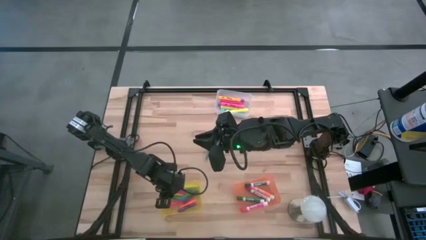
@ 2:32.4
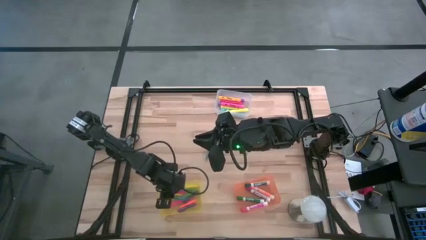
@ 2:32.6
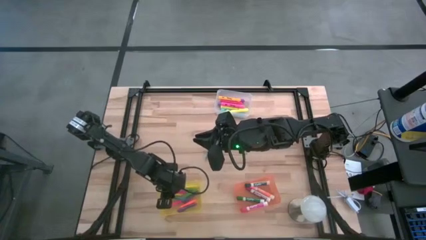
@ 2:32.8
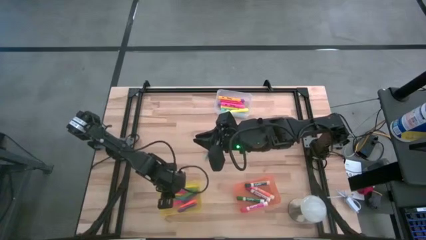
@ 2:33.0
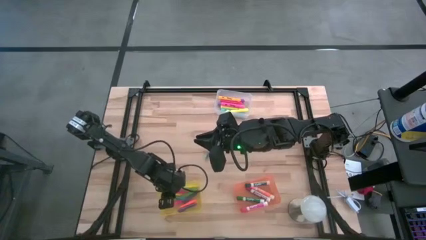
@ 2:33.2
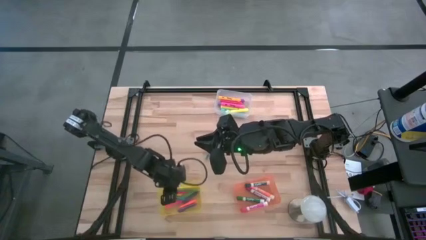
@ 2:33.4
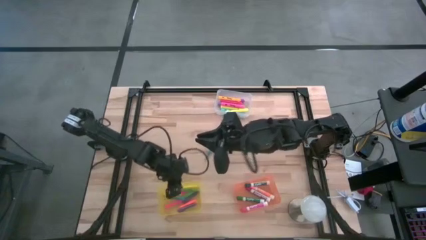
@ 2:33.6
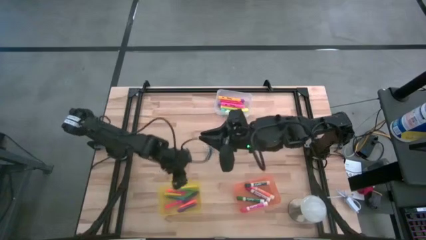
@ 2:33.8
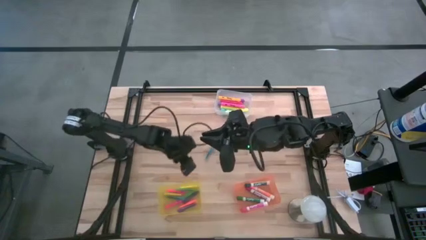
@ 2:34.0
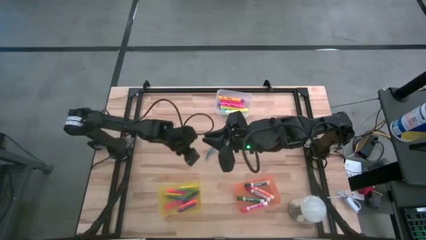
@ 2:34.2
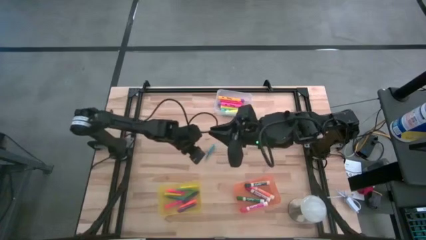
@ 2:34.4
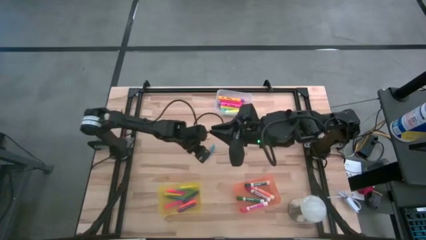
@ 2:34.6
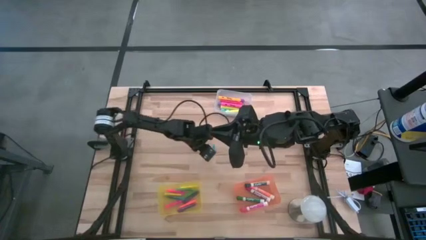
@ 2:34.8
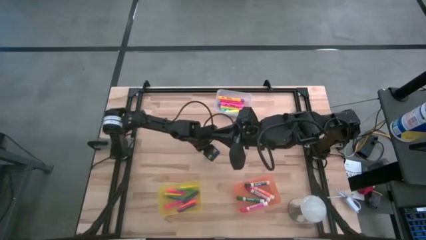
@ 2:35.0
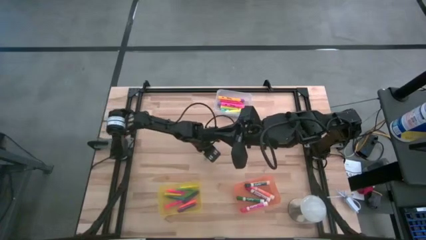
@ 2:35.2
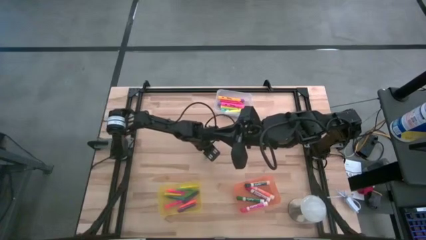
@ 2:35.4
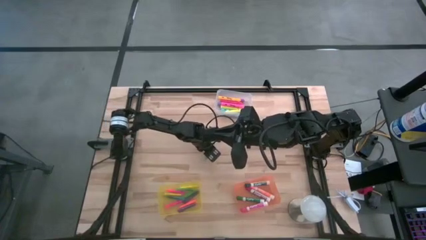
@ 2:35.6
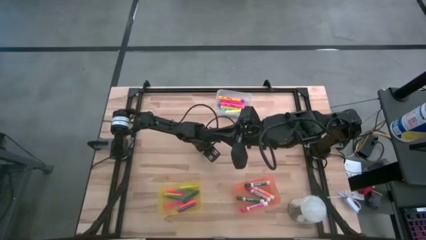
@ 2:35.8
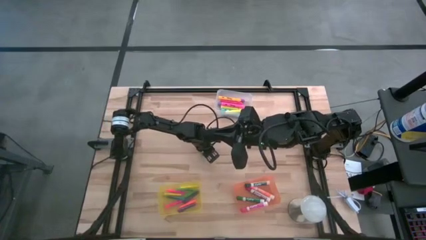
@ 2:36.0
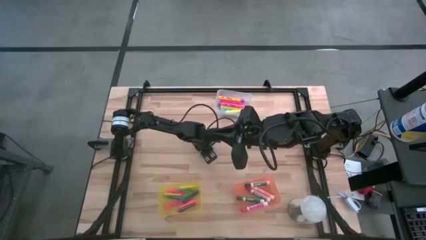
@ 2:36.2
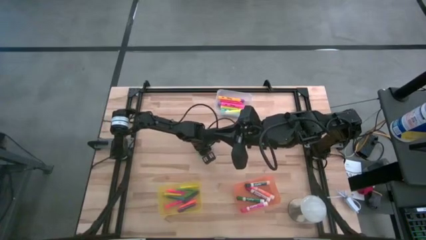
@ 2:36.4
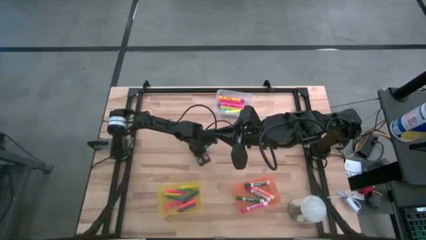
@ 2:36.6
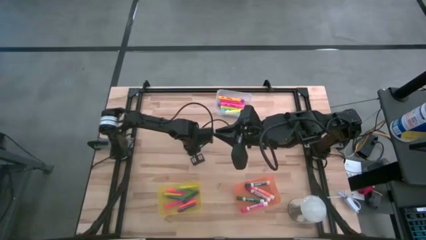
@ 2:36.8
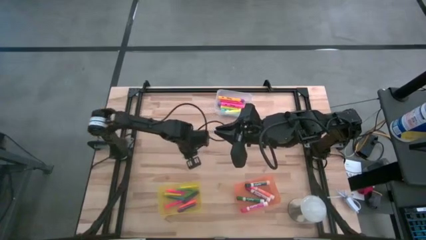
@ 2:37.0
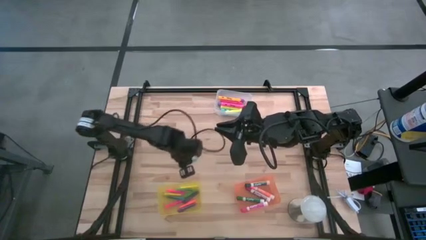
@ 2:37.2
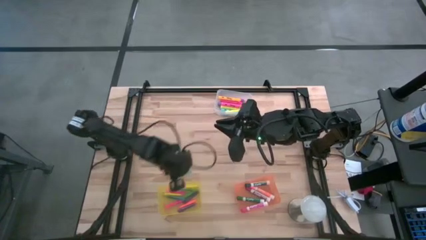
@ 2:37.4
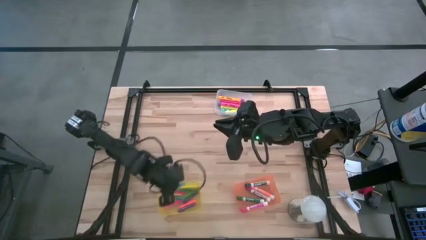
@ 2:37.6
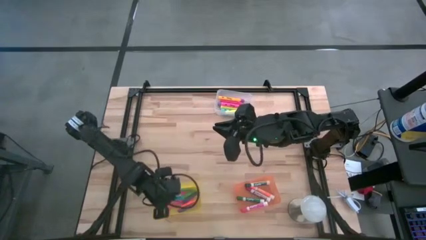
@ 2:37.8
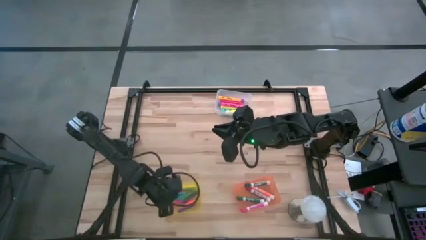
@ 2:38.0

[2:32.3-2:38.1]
Task: Pick & Place Markers
Put the blue pen into the yellow bin

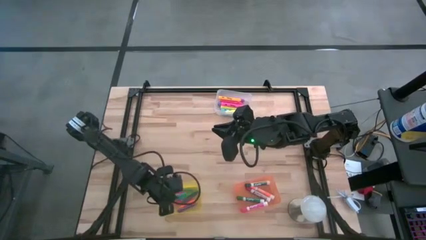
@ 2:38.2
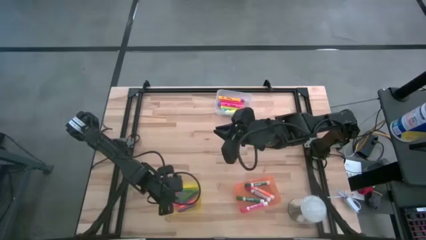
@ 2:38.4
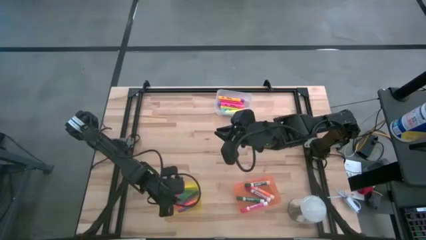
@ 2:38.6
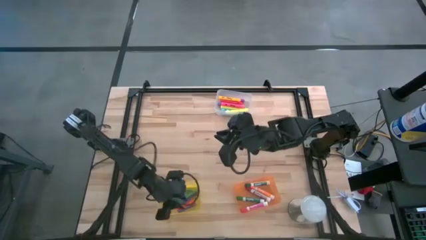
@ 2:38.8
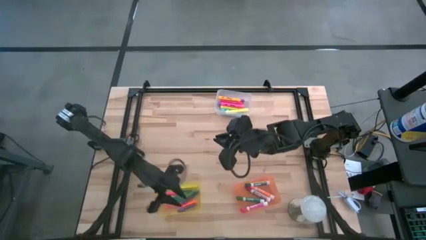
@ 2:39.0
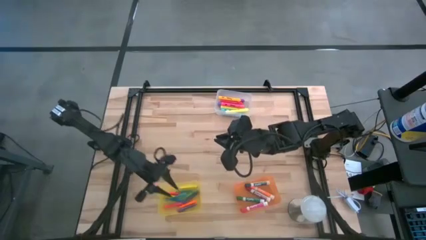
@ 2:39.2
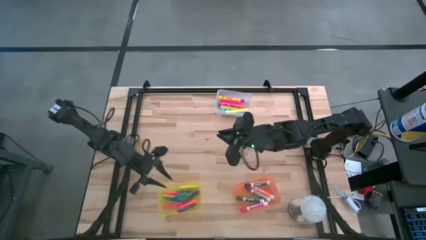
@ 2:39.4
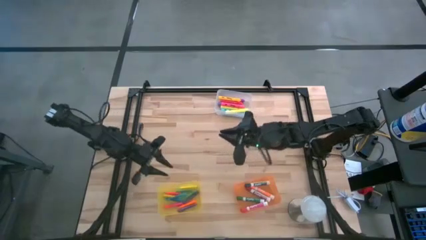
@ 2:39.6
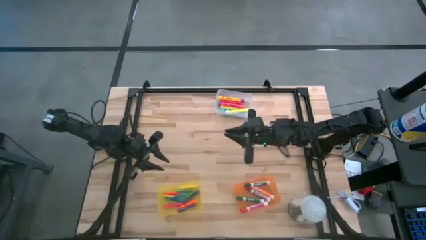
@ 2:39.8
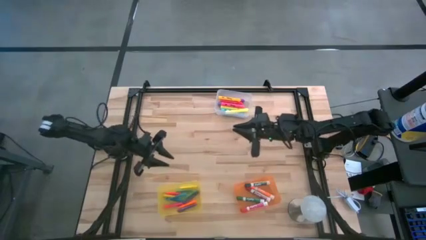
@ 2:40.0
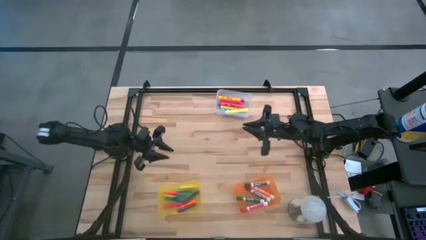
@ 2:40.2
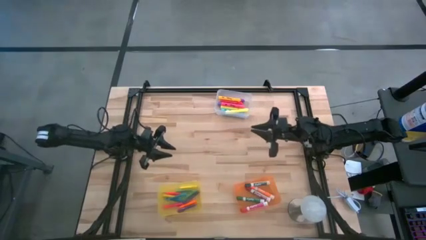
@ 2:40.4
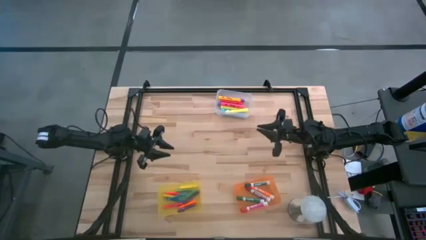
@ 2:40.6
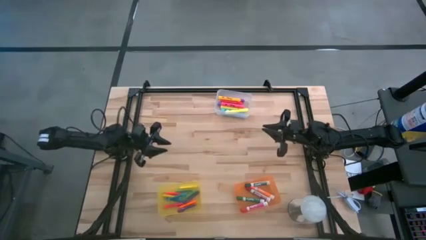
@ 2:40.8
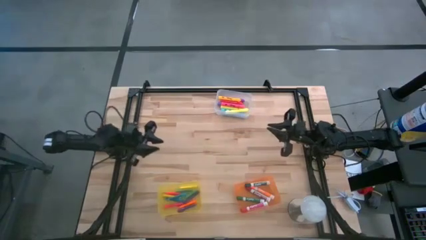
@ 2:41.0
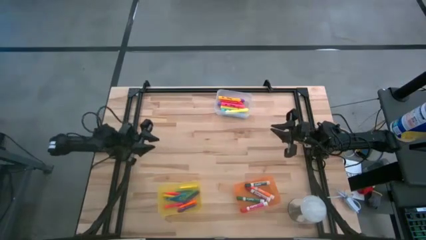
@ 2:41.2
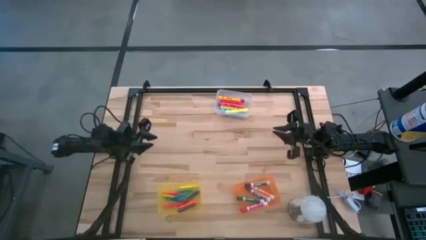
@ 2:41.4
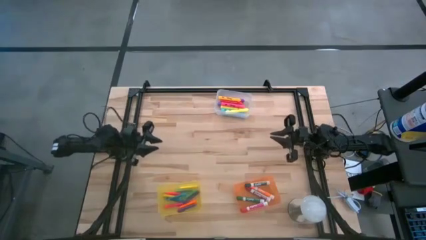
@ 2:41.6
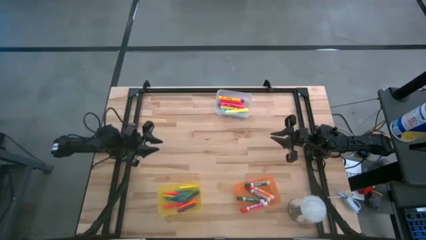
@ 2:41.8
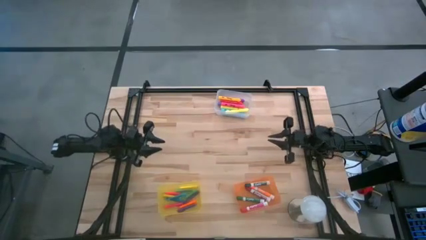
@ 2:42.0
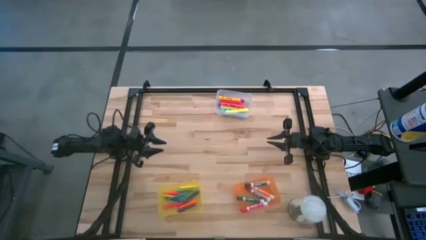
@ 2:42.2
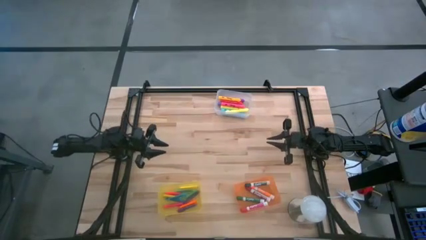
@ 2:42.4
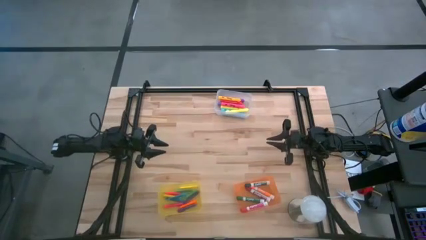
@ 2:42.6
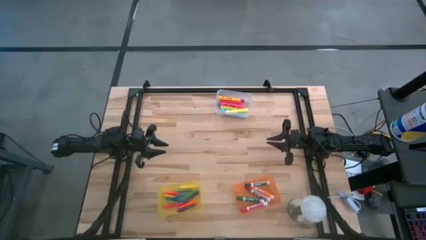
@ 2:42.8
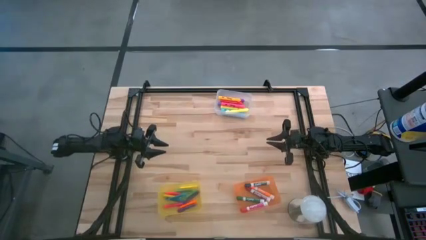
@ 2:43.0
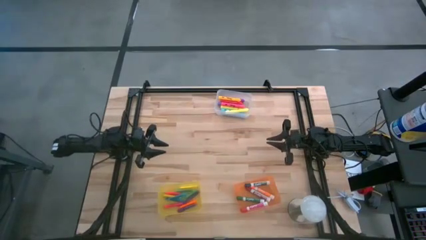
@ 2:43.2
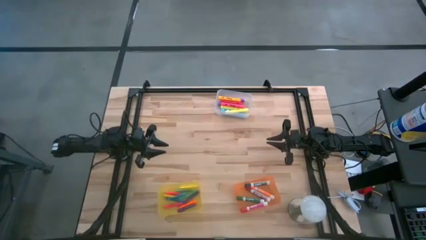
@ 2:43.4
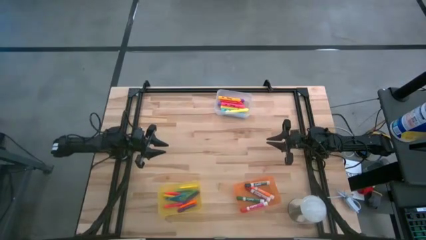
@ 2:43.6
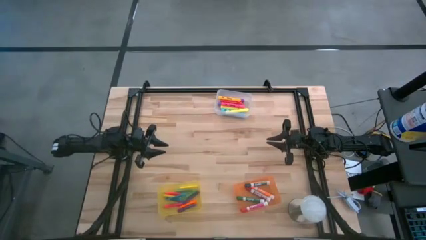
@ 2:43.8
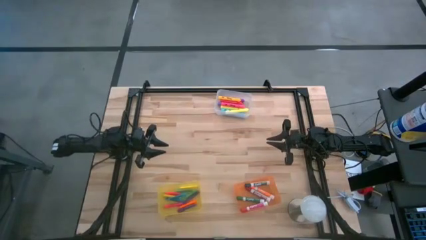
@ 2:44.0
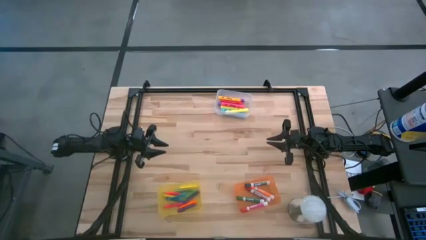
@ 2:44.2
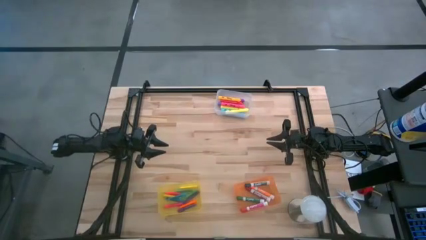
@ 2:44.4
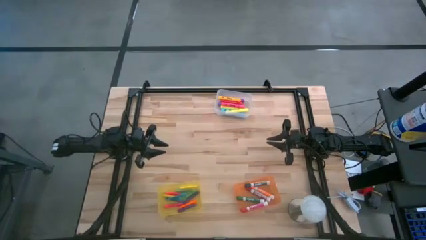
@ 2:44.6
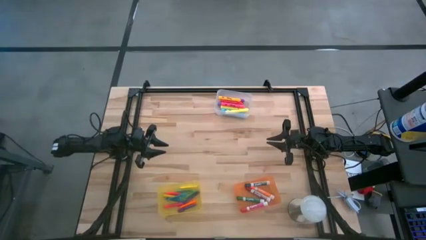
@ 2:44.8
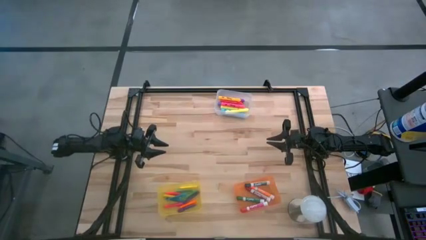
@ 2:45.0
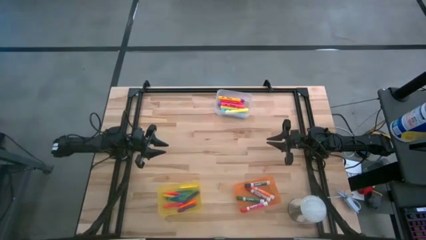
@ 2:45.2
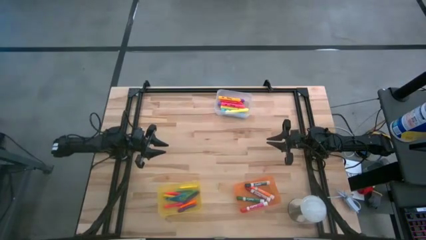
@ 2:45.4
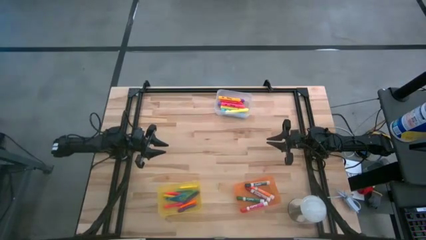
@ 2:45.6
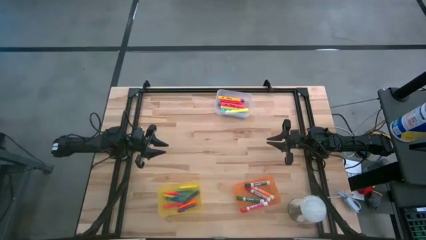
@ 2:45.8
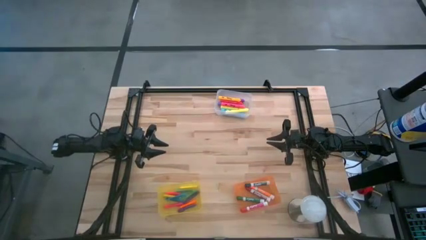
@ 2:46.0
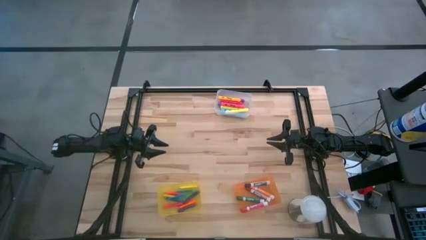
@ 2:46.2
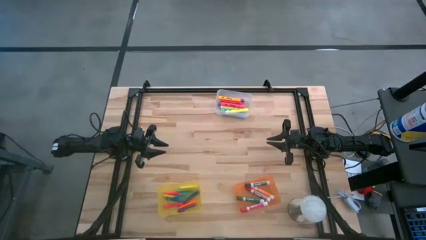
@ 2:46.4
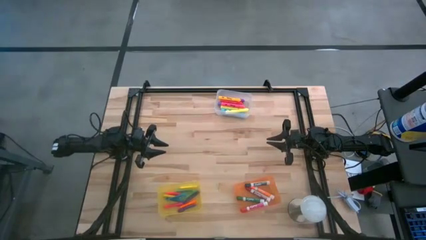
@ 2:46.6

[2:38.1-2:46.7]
Return to Home Position

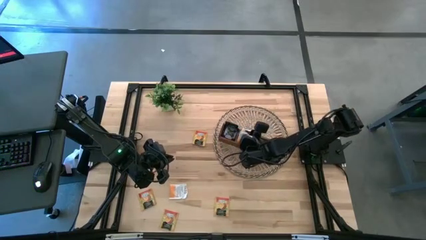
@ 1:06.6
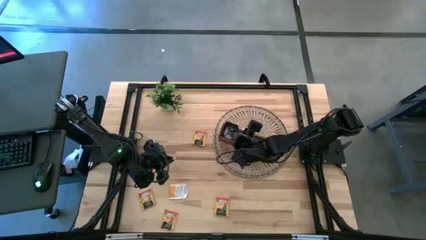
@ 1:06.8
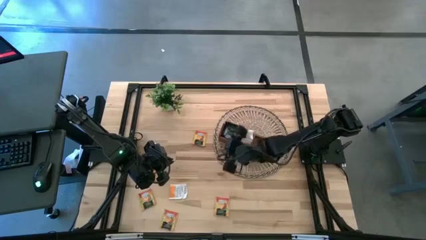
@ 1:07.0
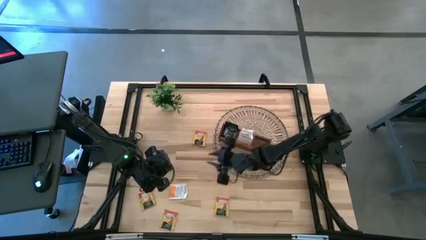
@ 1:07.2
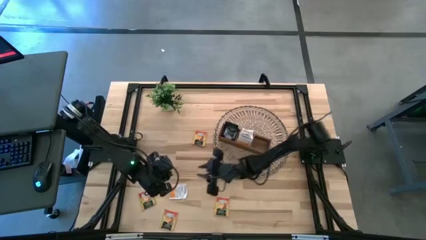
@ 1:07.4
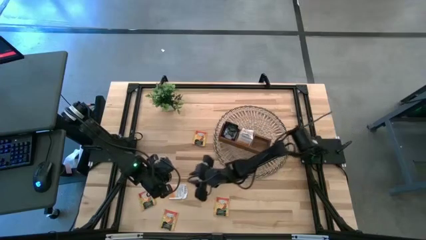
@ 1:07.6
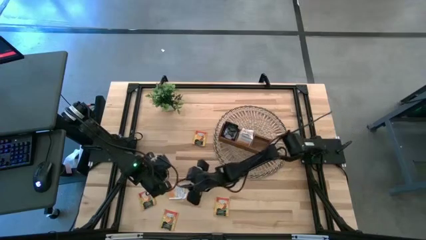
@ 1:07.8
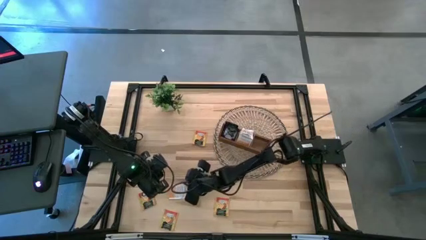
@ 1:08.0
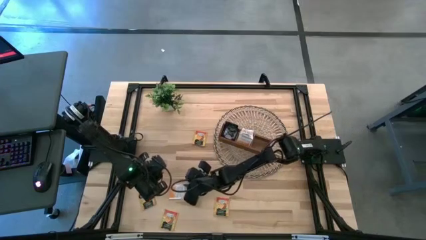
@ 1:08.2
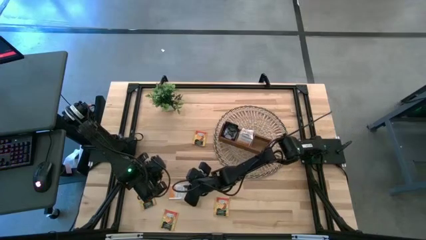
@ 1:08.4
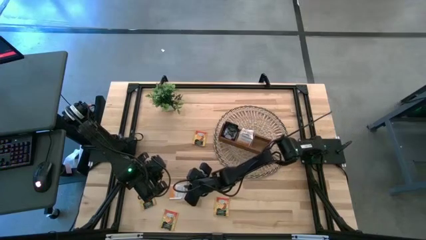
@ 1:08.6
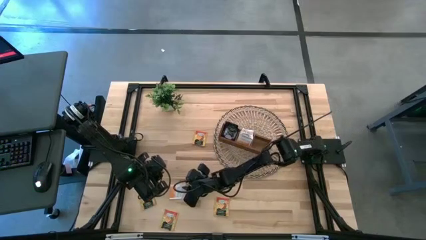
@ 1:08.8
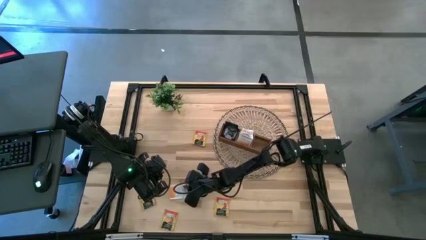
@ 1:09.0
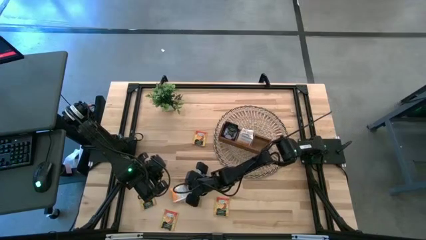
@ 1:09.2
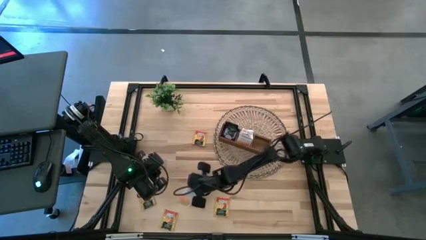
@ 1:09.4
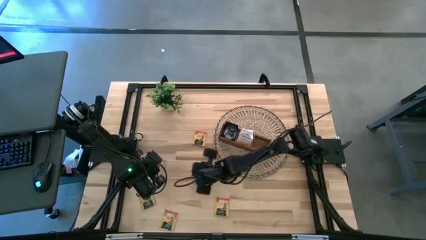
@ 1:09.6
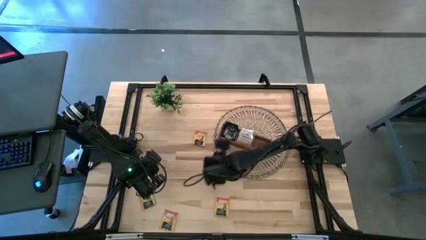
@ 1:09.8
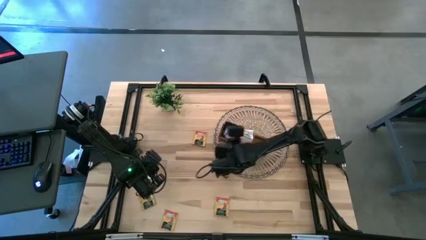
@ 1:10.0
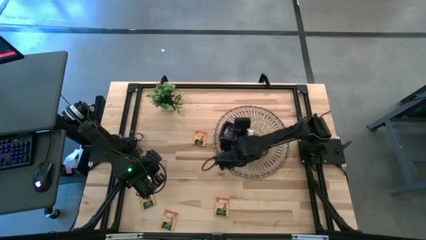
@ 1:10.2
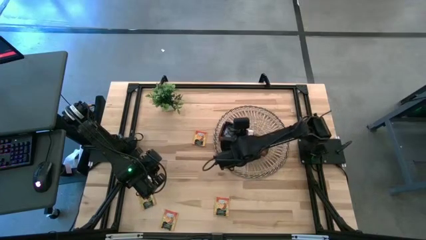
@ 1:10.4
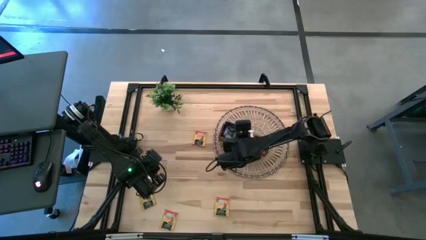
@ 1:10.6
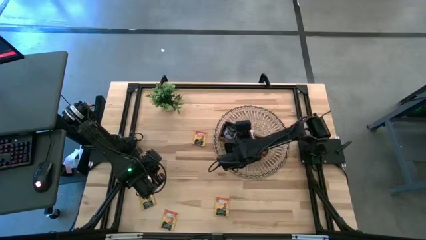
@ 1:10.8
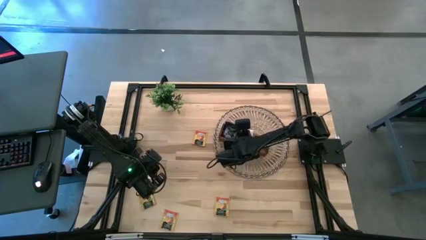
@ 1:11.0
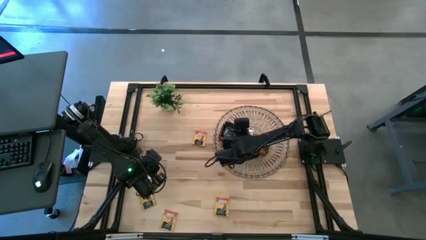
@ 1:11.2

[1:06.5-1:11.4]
Task: Pick & Place Tea
Put the white tea bag into the middle section of the wooden organizer
